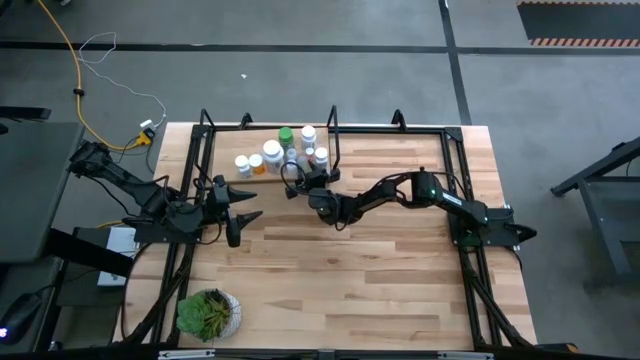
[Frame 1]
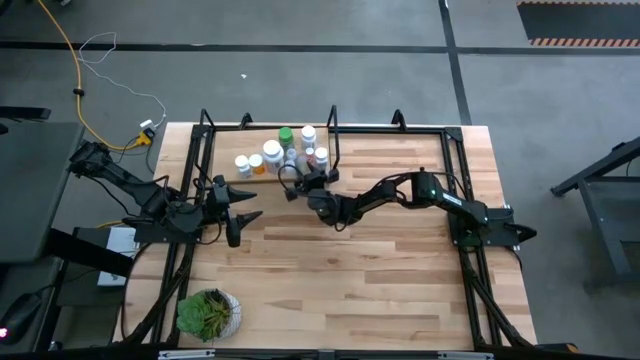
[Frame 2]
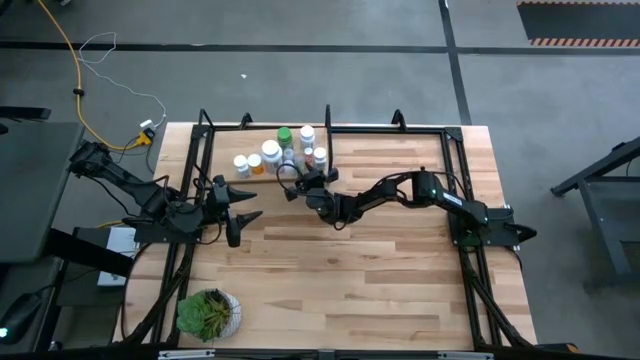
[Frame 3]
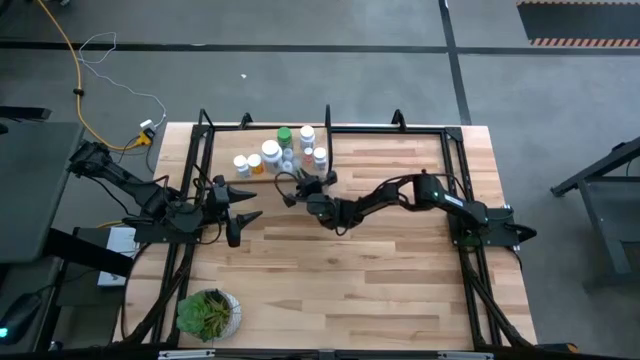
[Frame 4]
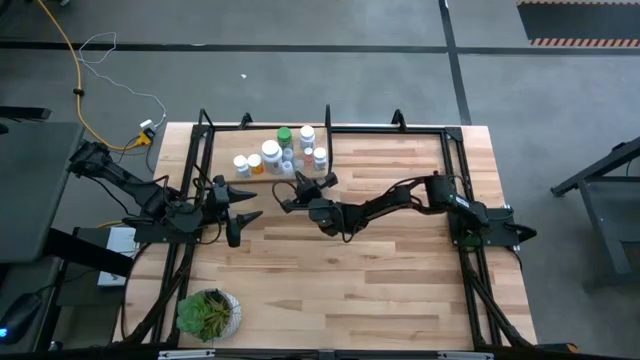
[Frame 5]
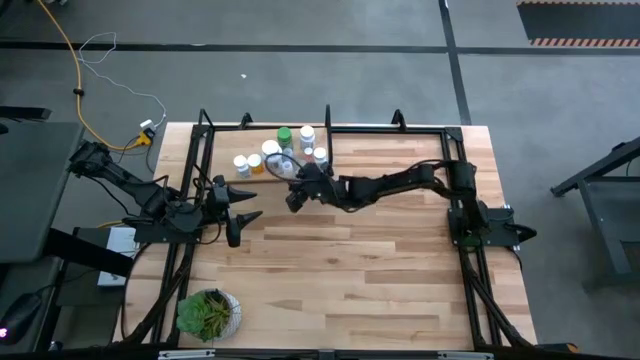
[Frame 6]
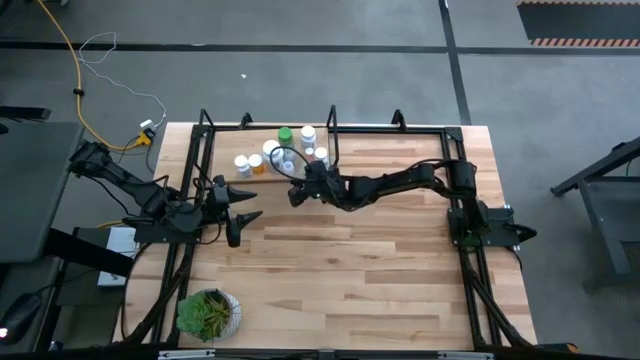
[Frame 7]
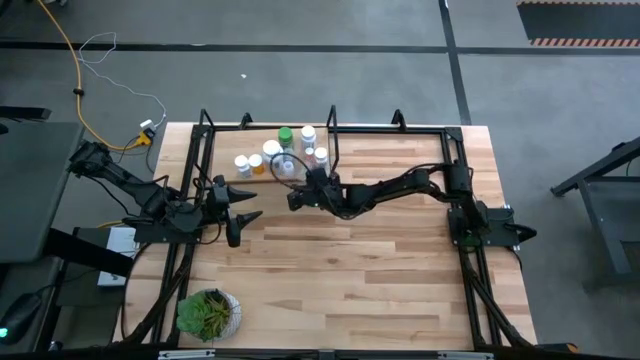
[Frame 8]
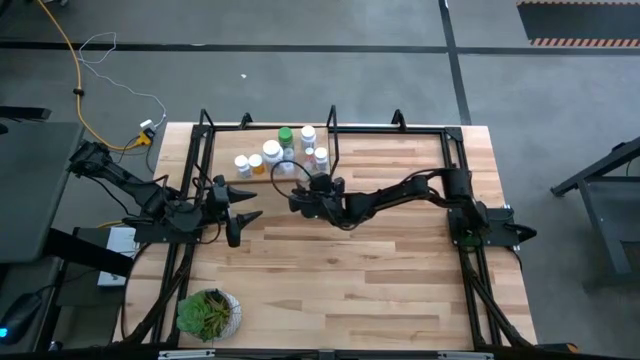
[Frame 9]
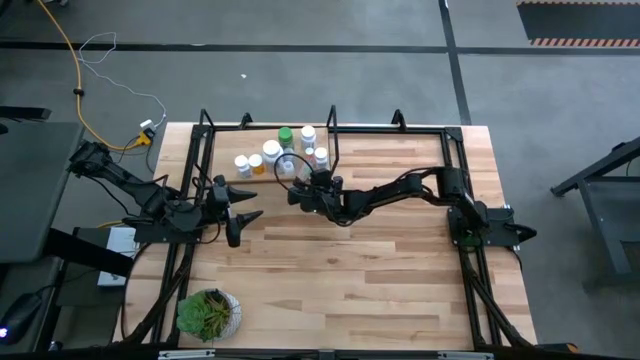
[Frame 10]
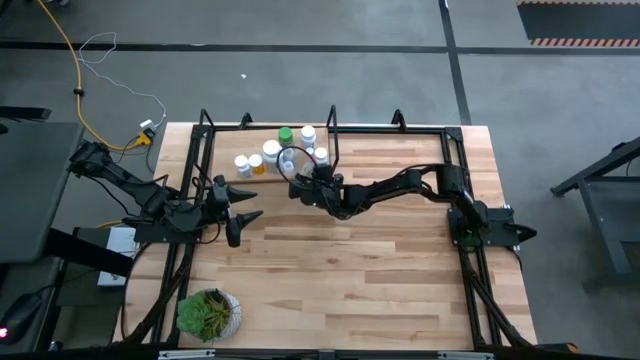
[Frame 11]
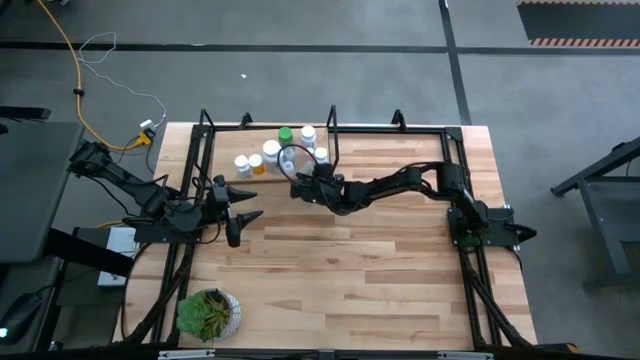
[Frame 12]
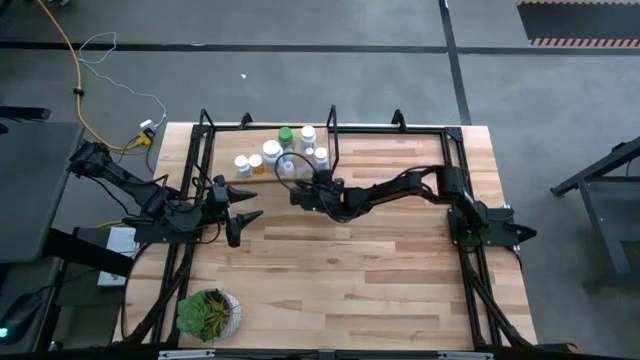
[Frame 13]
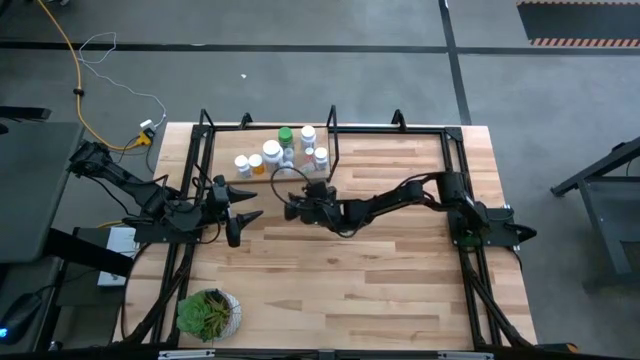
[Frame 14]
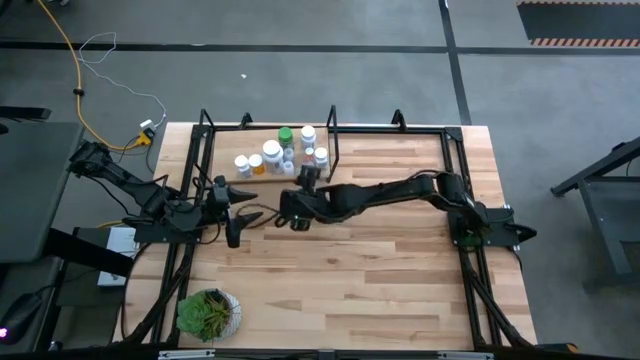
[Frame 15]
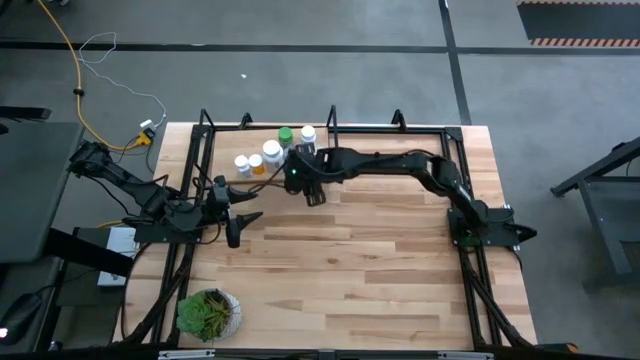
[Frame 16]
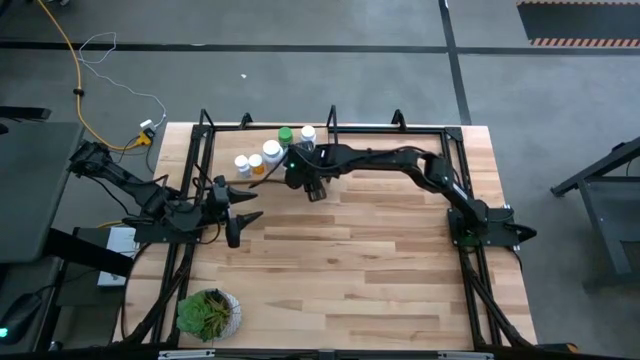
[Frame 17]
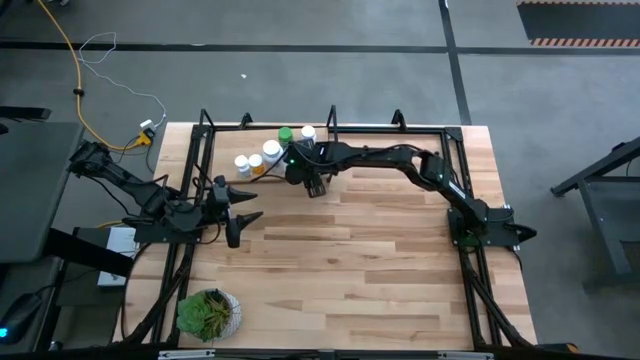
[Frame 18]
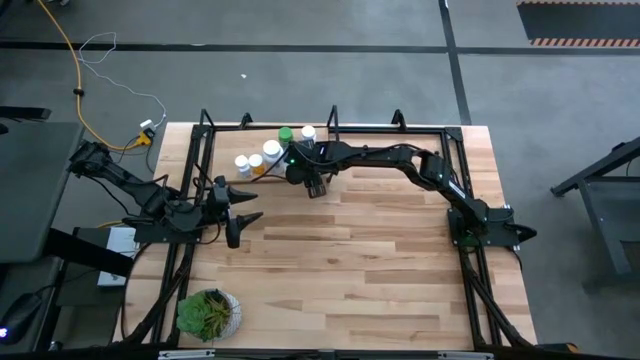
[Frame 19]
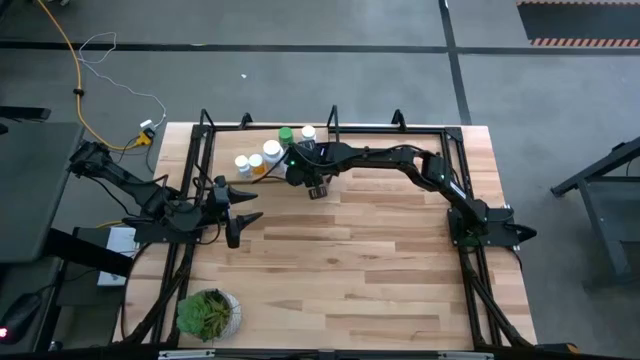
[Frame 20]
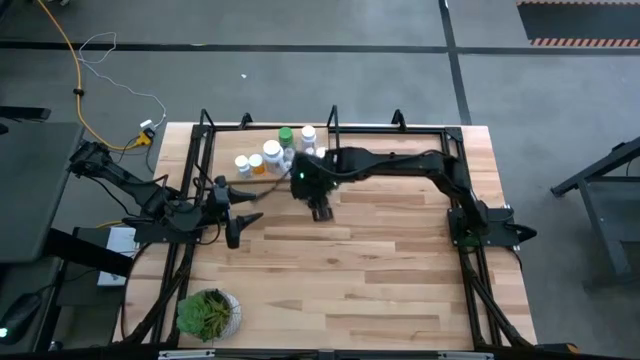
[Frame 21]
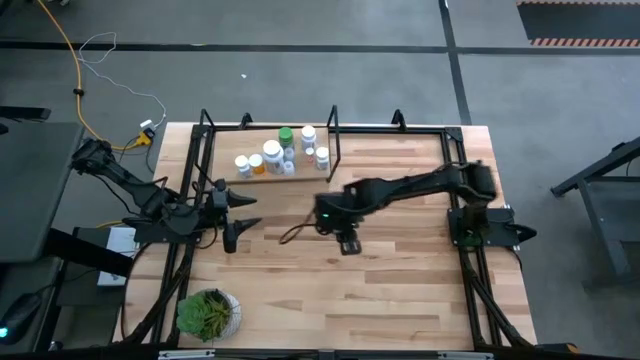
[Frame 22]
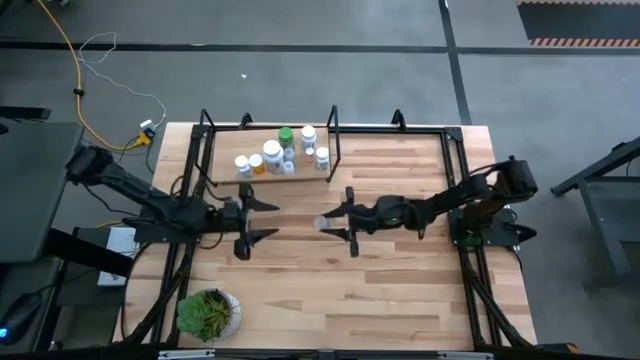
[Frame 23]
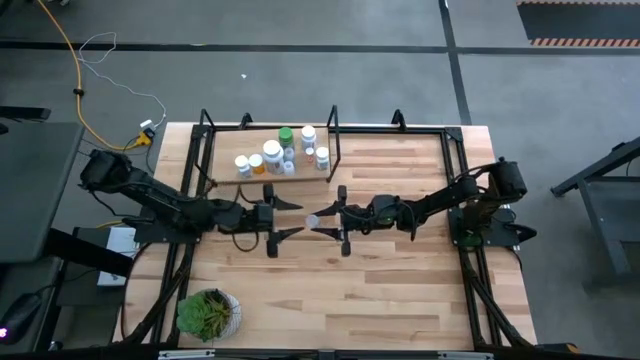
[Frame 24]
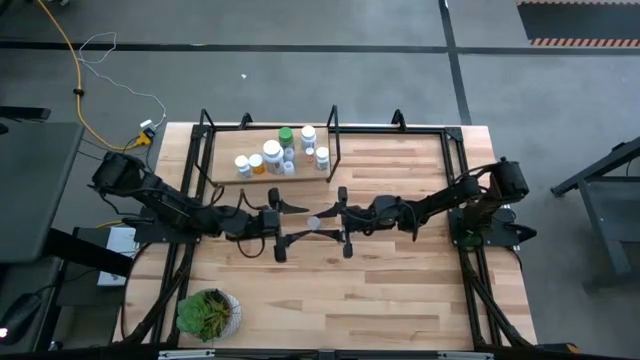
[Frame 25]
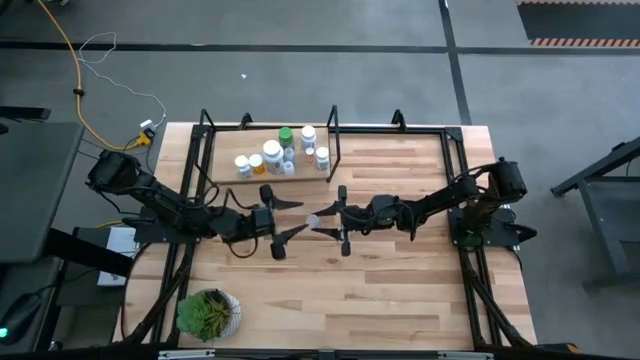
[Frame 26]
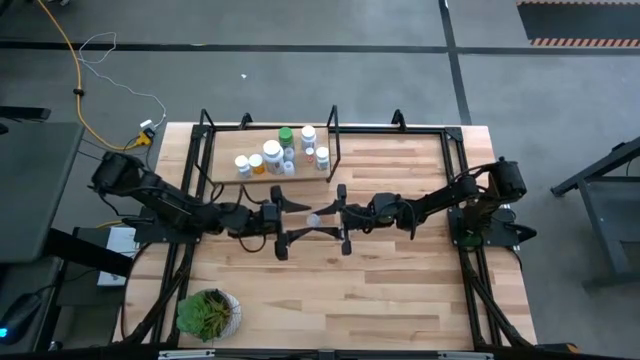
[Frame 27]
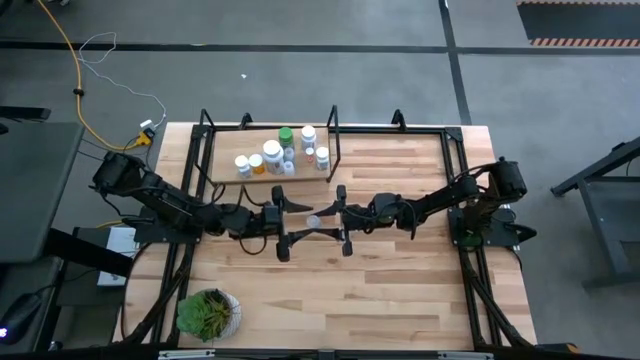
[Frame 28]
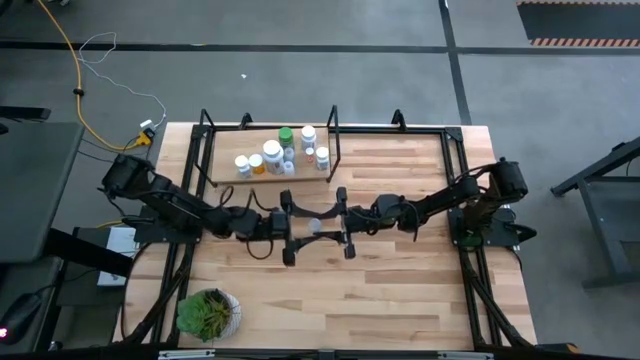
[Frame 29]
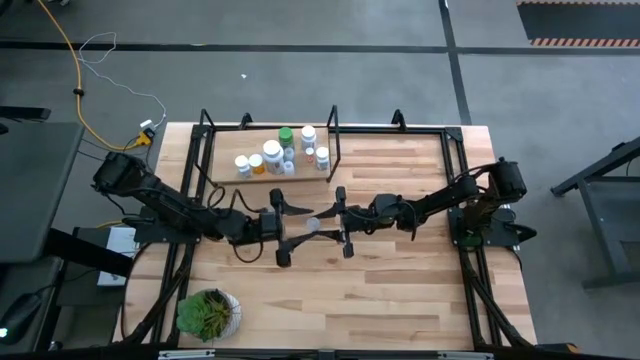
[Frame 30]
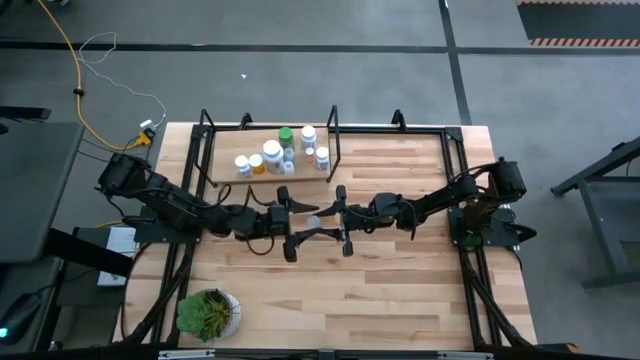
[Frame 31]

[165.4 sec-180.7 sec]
Task: Pick and place medicine bottles onto shelf by color
Adjust the small green pill bottle on the shelf

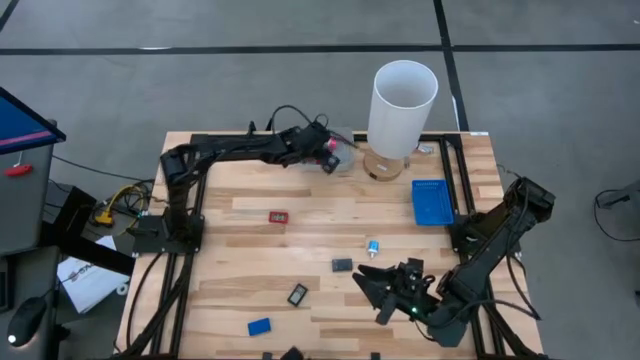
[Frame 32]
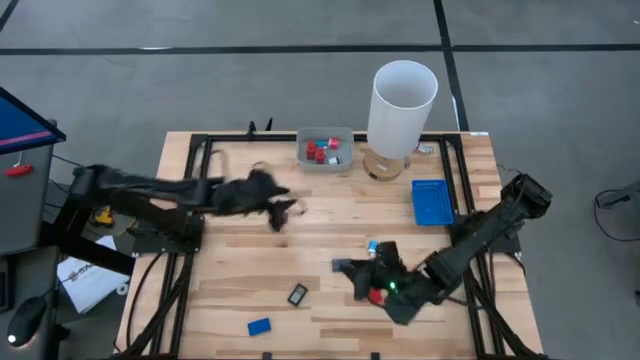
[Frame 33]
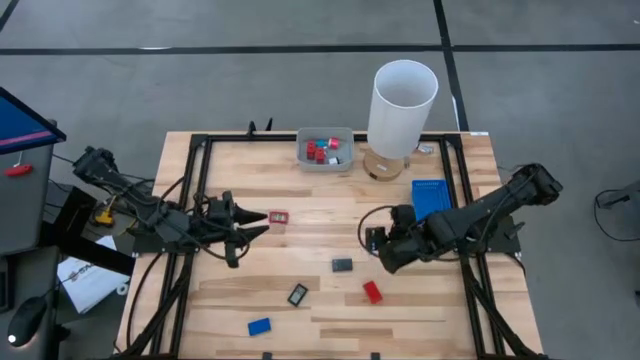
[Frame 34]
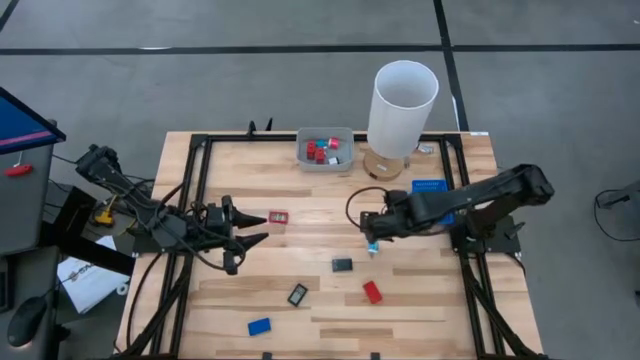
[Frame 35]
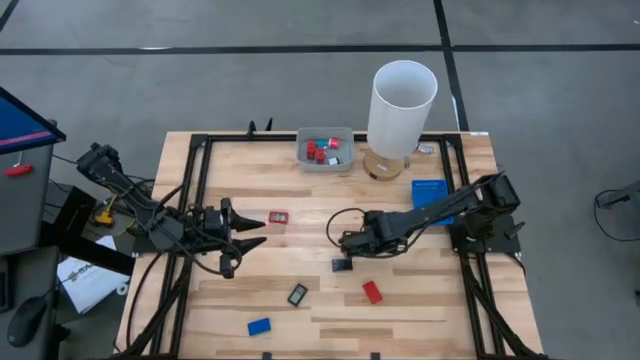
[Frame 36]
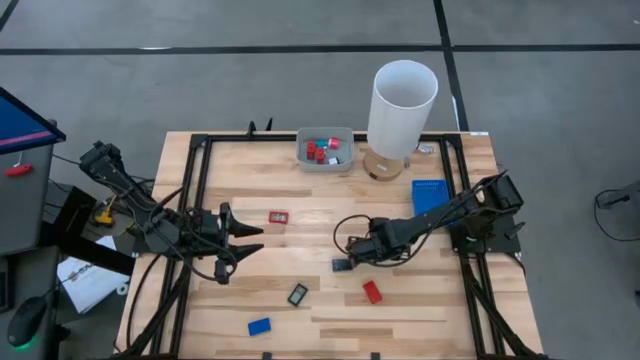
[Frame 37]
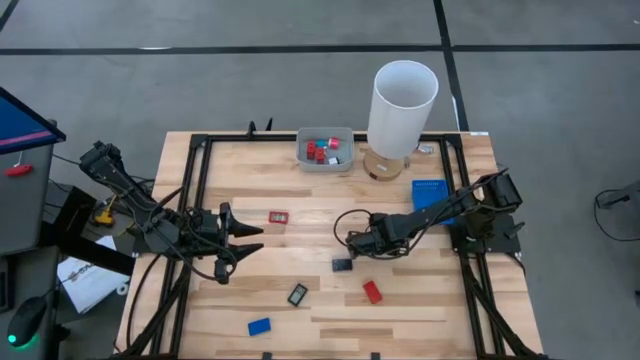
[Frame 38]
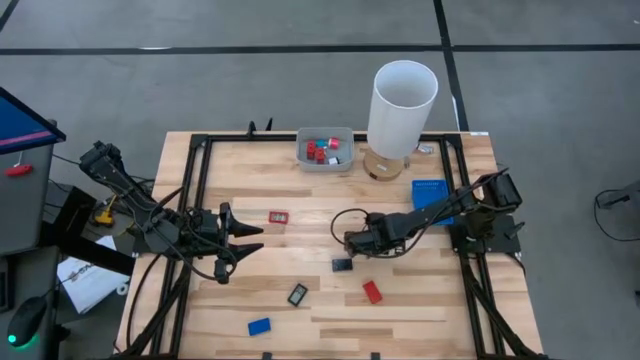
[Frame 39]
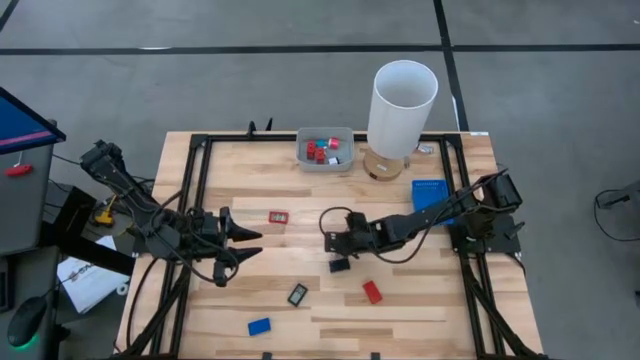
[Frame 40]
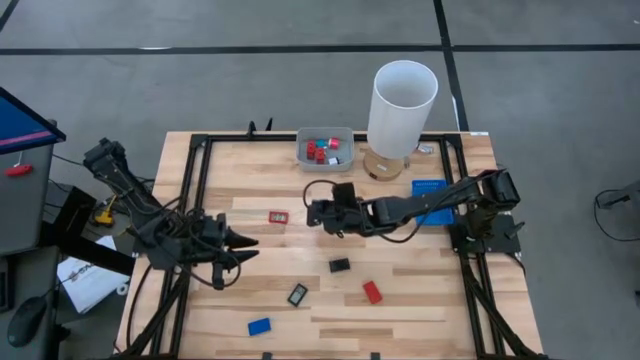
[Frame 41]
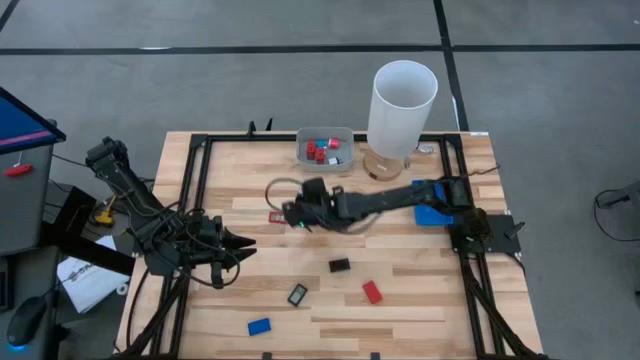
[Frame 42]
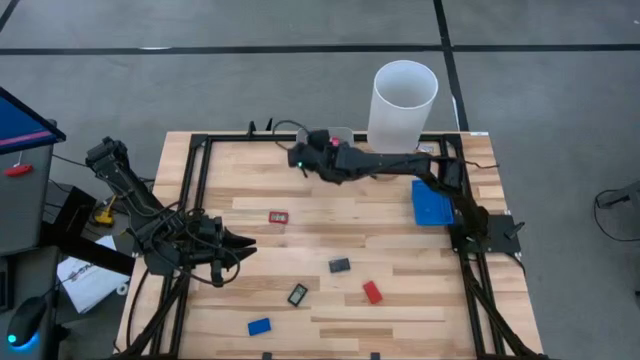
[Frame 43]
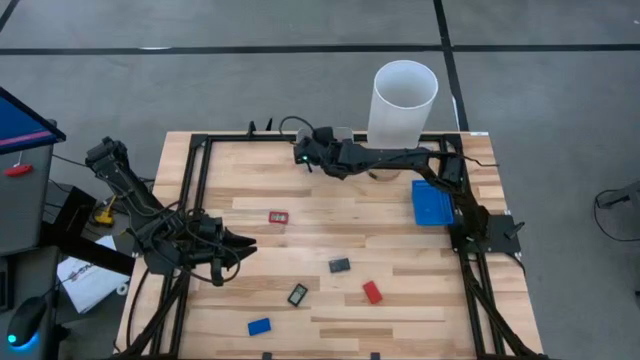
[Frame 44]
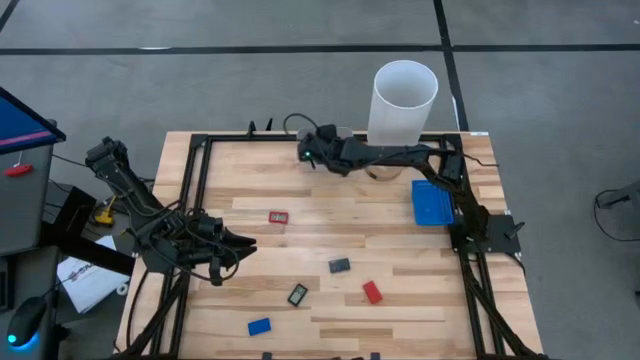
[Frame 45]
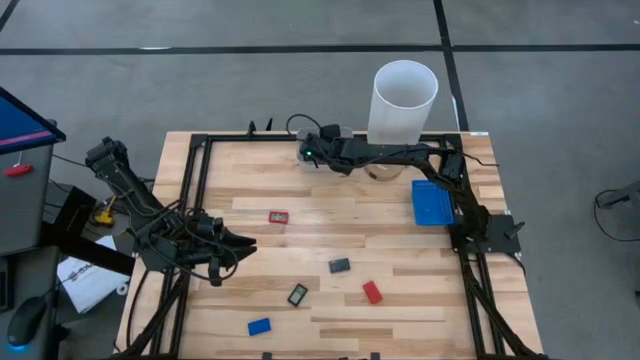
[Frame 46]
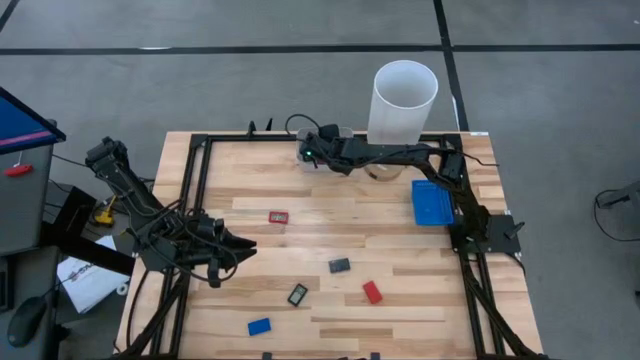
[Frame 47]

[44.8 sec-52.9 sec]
Task: Pick & Place Office items
Put the blue charger adapter into the gray bin
